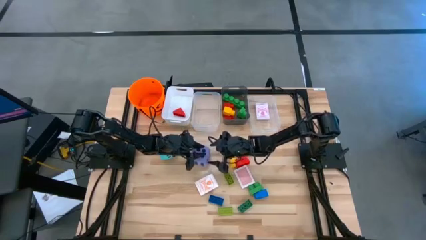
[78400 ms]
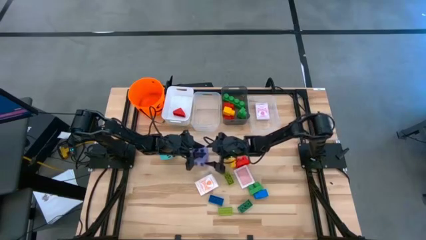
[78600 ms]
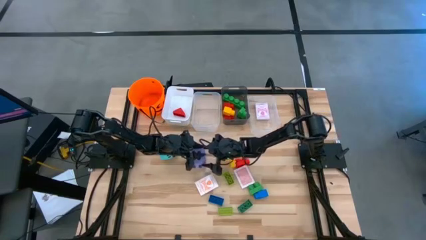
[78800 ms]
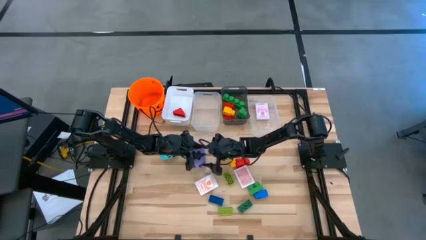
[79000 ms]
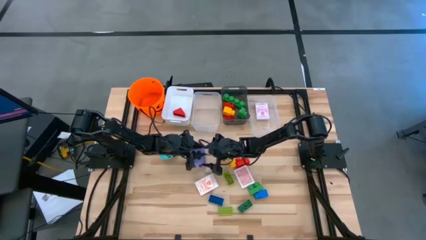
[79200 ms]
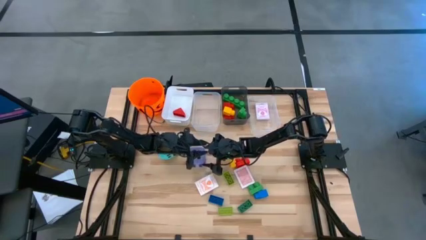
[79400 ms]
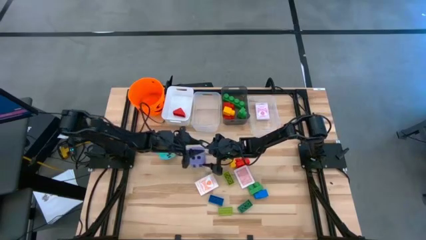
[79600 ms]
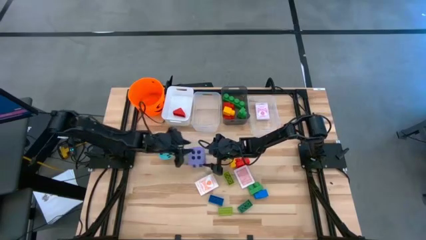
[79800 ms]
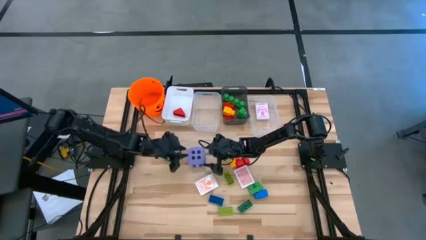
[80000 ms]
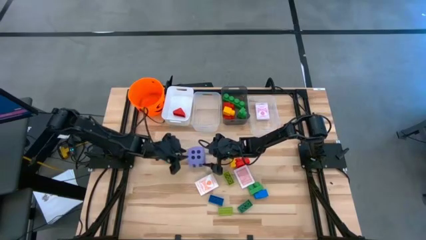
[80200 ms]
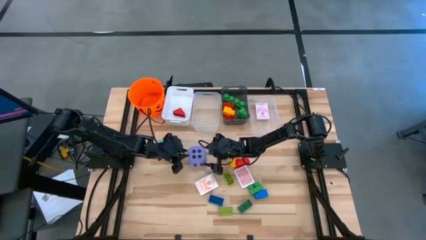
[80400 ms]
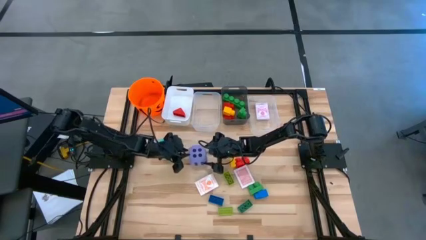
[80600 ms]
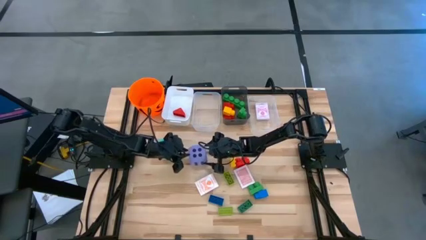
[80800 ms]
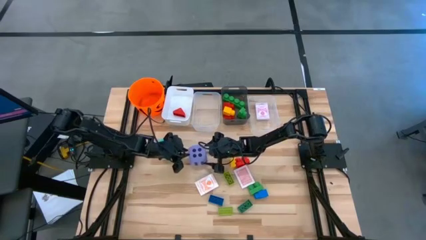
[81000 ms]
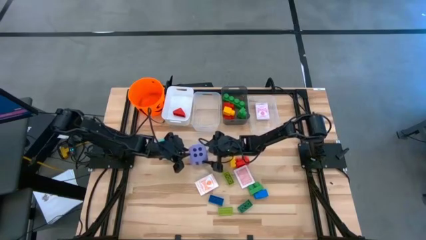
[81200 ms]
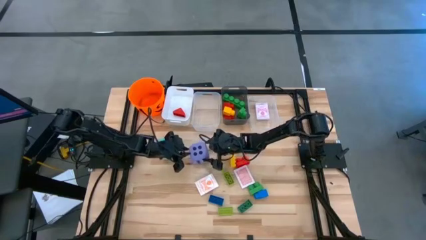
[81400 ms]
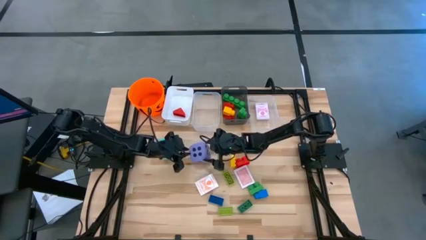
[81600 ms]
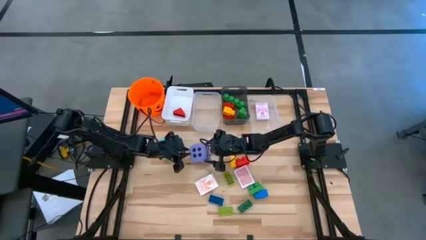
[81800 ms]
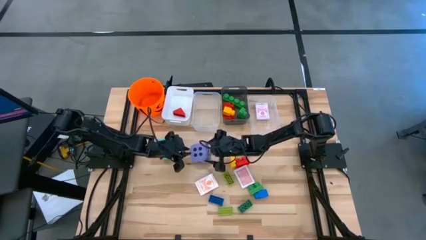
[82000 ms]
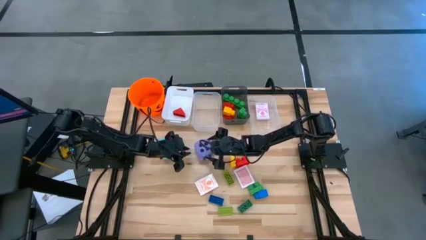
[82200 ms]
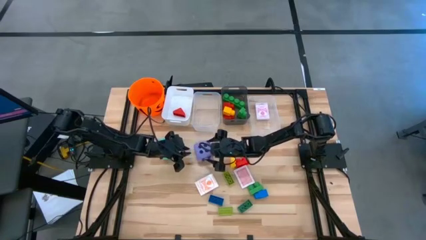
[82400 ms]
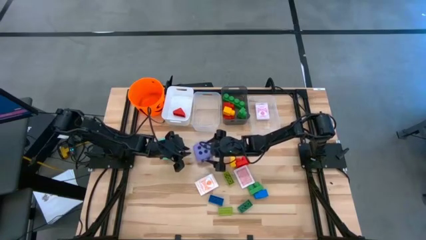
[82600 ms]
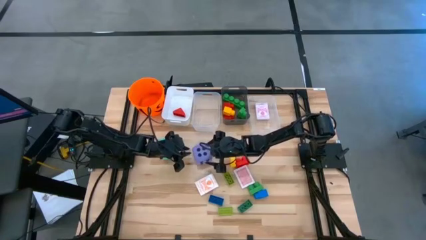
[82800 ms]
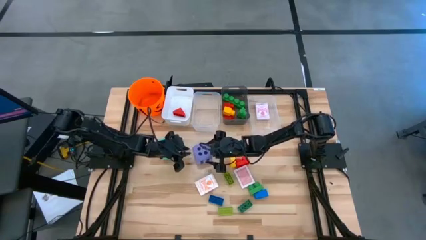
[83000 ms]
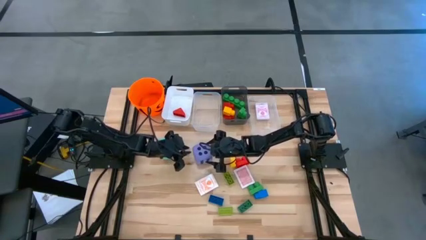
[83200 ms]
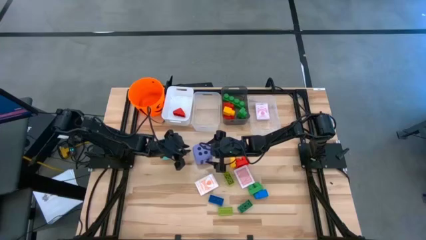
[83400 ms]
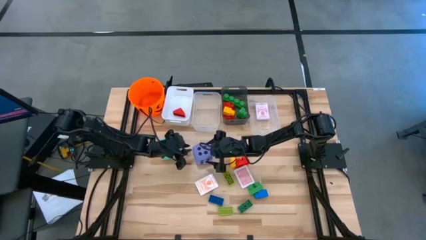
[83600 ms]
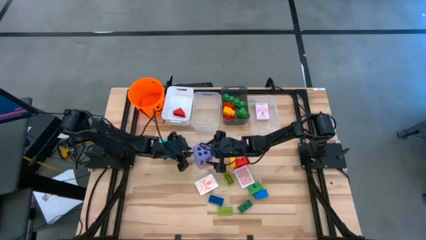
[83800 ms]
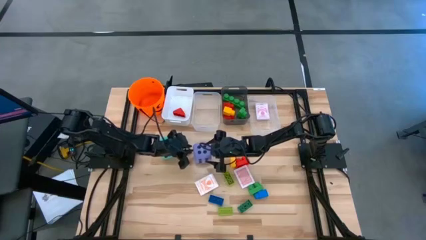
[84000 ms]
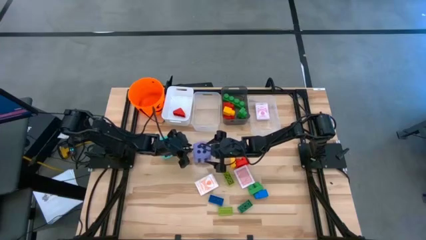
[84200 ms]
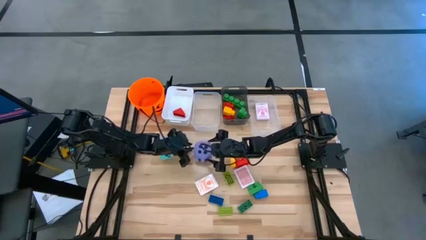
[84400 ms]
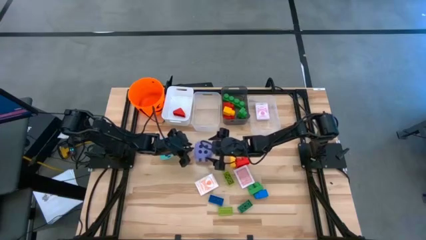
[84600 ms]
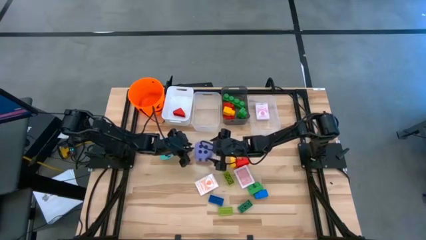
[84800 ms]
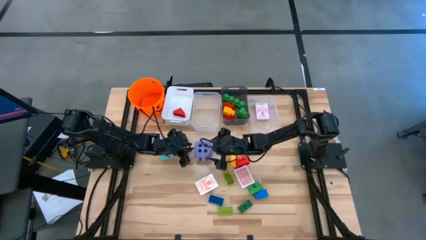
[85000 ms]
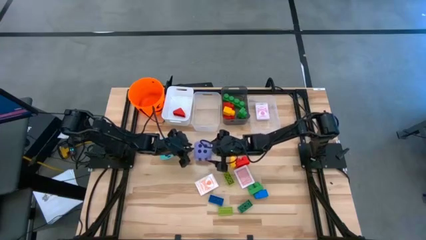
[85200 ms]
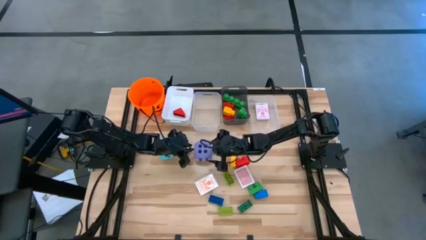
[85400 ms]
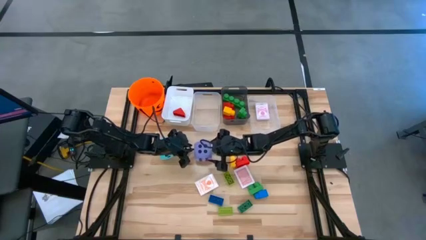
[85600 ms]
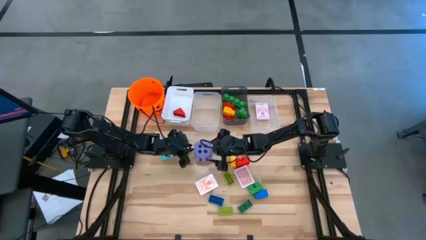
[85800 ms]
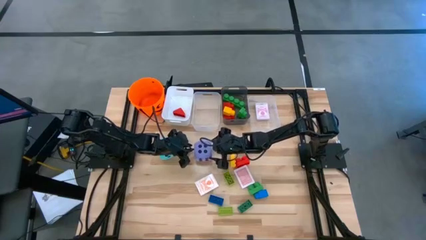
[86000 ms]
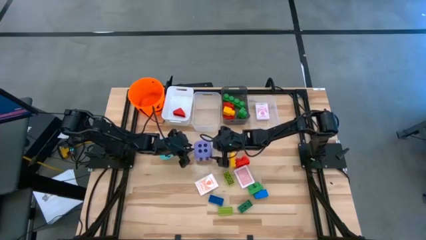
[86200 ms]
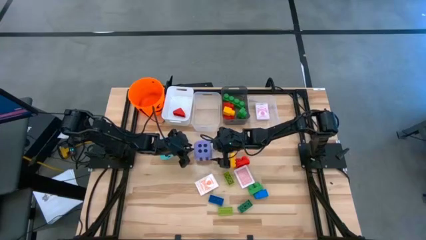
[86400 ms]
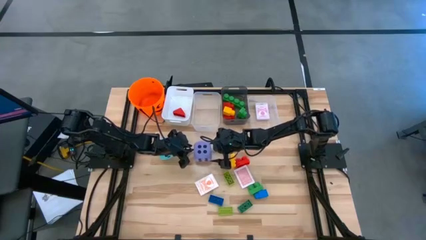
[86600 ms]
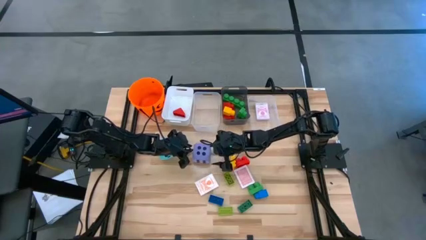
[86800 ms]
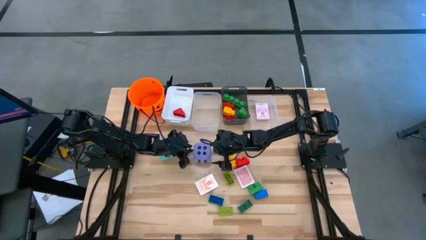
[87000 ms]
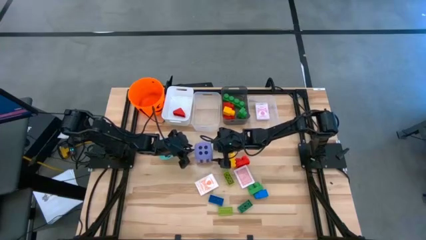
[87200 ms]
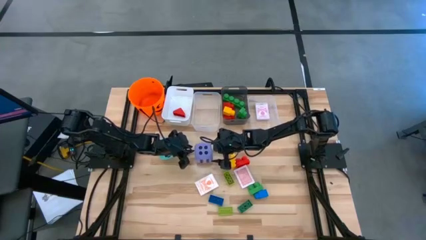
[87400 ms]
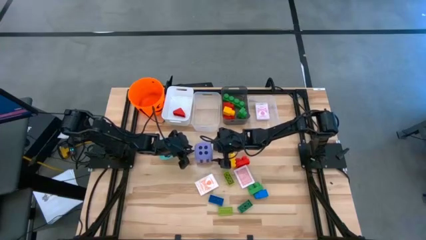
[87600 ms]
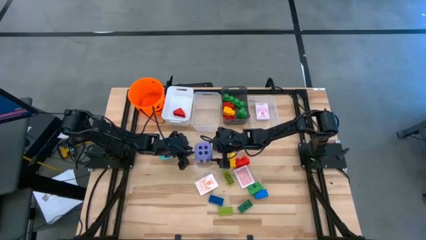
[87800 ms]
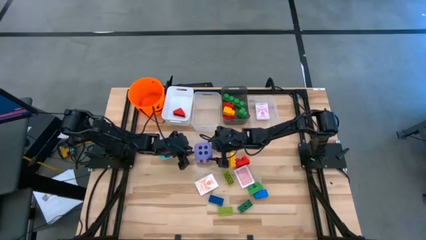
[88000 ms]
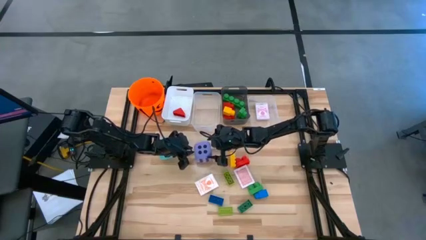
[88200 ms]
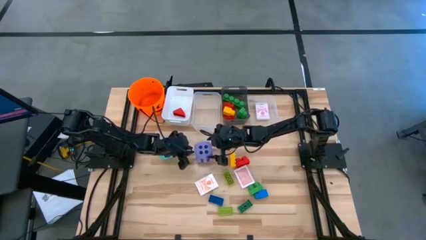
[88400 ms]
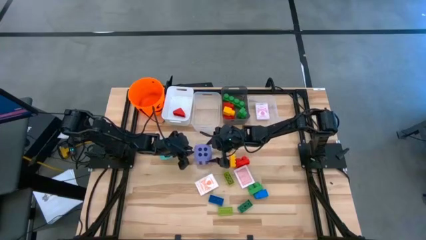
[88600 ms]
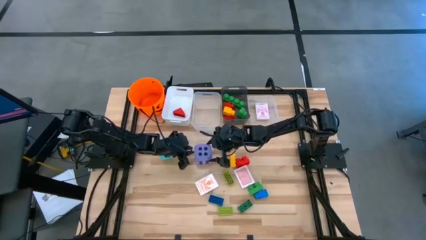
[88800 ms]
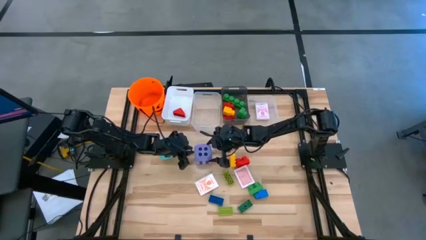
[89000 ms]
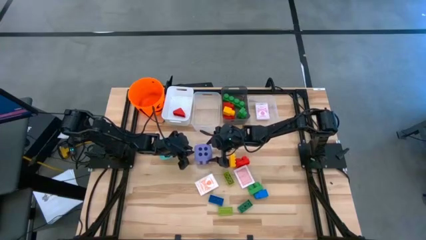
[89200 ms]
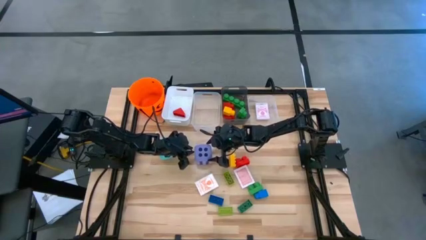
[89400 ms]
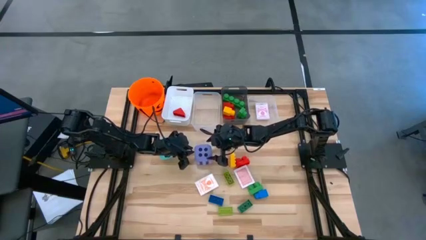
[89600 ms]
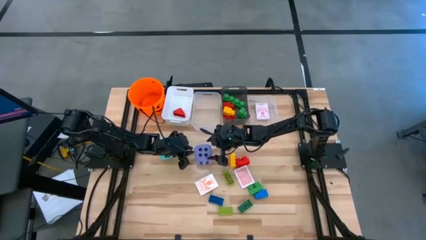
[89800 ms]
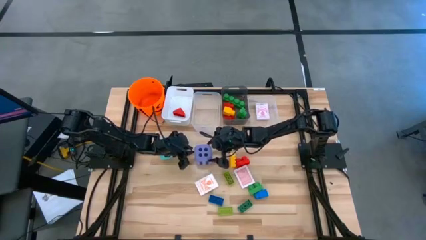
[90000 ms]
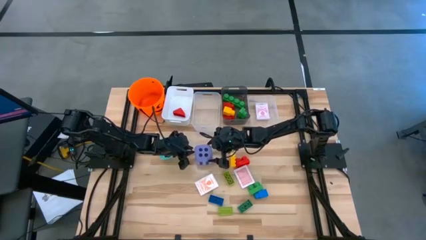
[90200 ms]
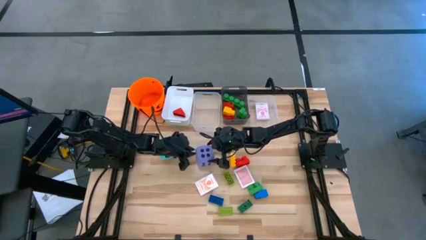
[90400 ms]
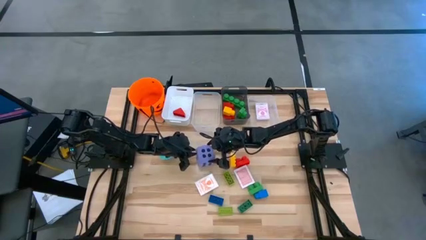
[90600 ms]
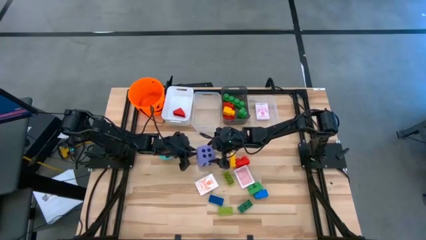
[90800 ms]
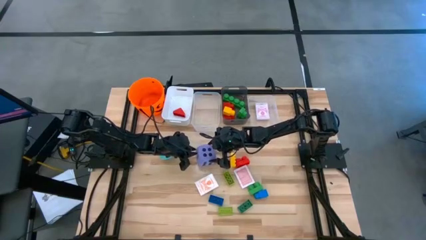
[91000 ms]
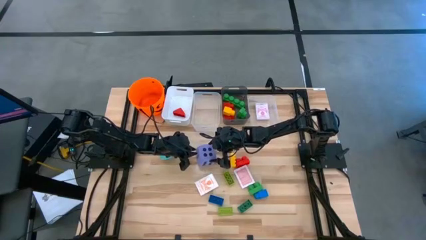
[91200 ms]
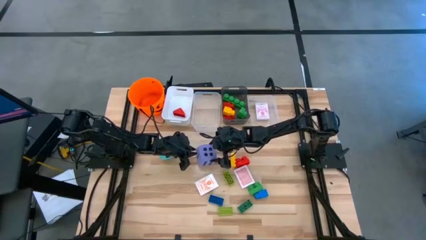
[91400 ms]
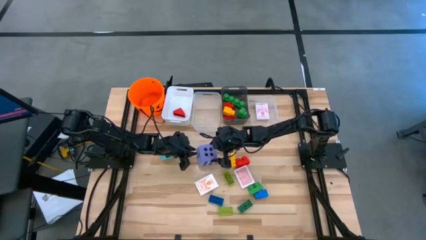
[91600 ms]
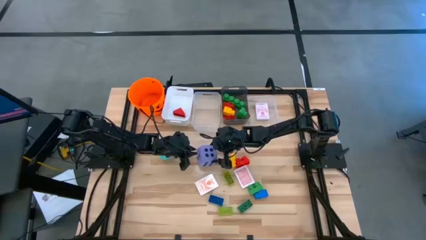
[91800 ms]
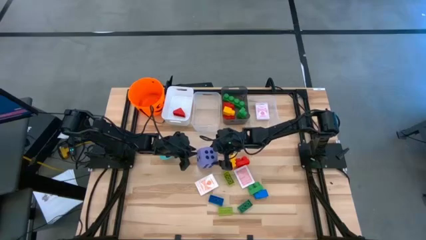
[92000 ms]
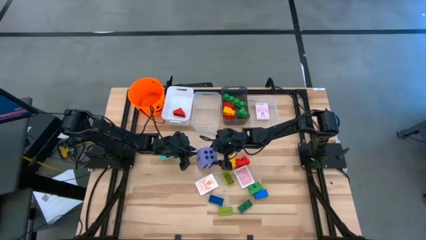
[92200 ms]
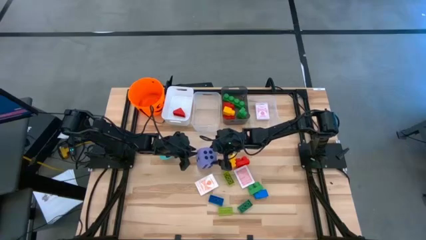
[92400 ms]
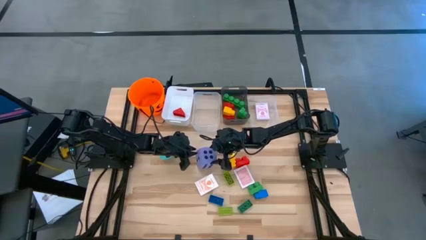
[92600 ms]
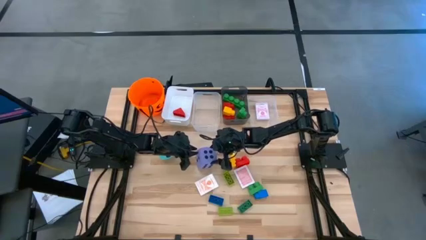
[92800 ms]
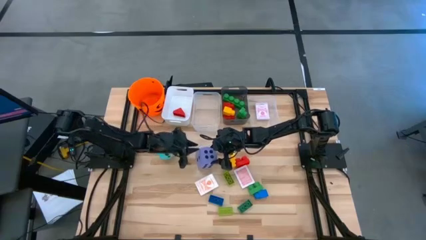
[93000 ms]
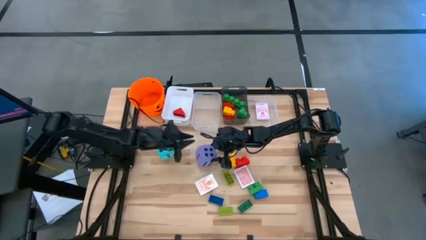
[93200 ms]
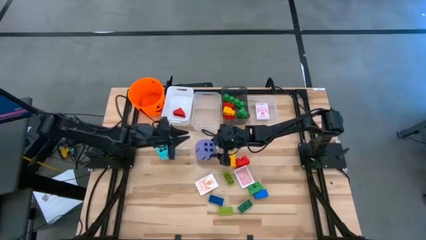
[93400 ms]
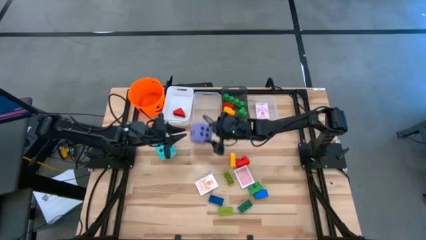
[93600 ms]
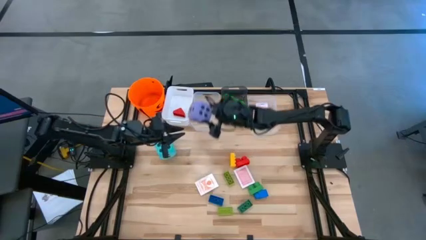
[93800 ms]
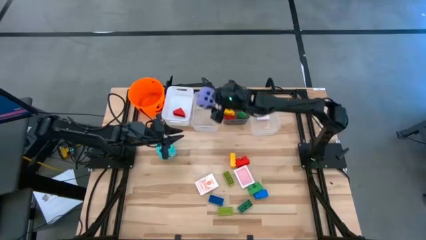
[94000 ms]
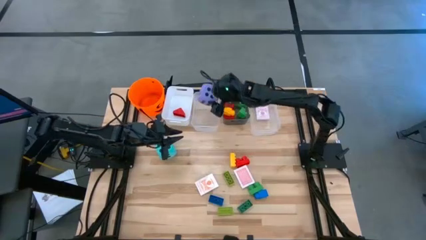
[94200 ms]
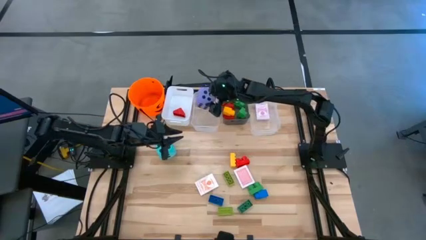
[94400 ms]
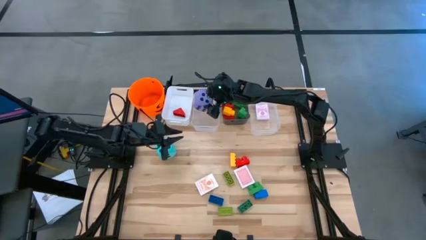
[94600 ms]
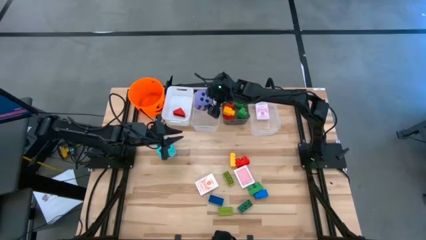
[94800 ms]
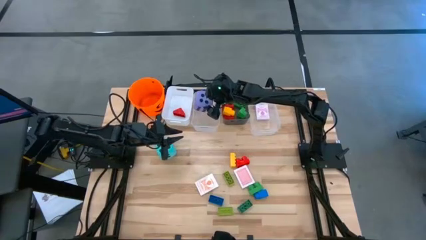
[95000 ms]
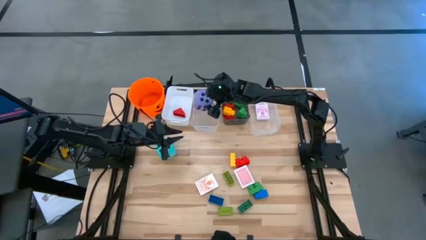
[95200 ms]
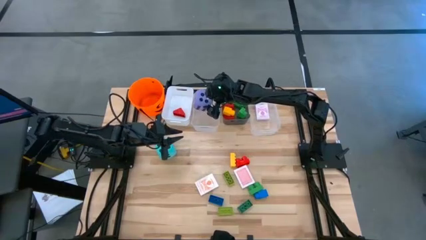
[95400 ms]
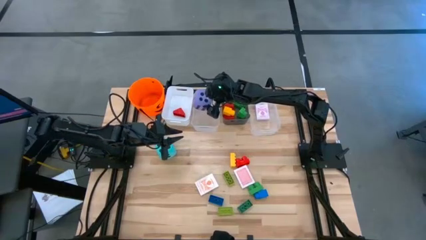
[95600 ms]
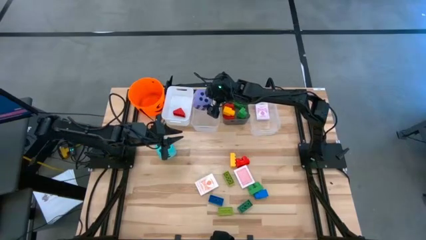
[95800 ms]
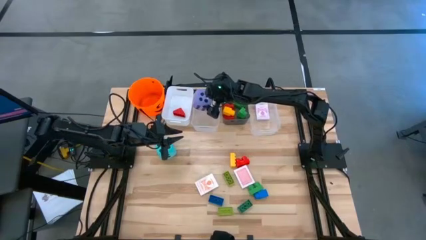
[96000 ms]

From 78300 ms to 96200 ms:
Task: Pick & Place Toys
Put the large violet dice into the left transparent bin
